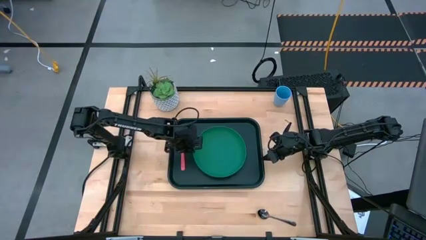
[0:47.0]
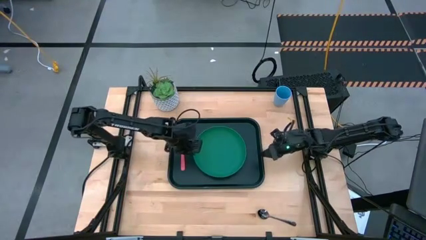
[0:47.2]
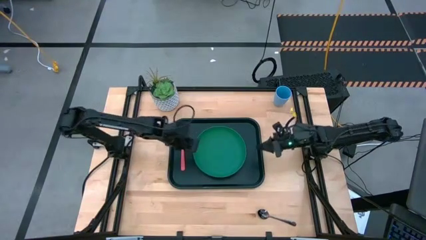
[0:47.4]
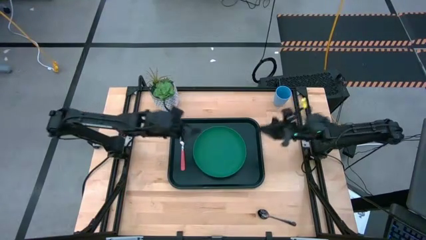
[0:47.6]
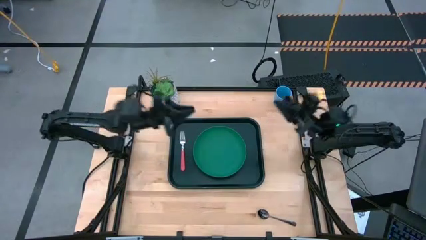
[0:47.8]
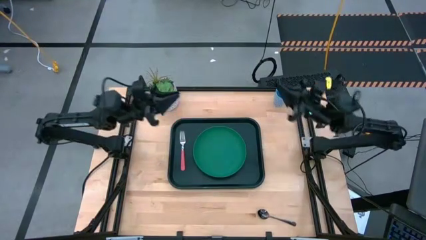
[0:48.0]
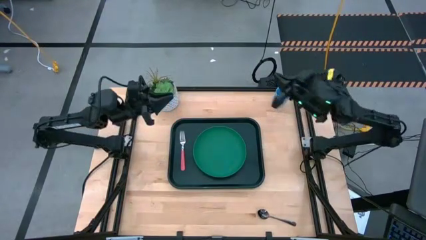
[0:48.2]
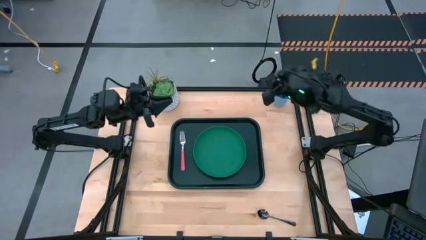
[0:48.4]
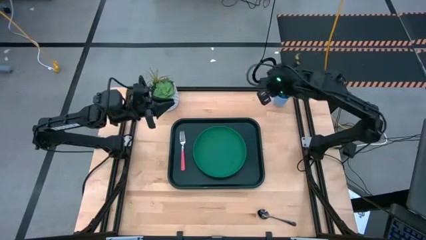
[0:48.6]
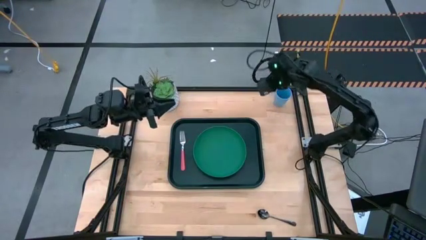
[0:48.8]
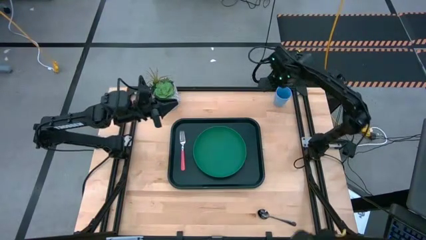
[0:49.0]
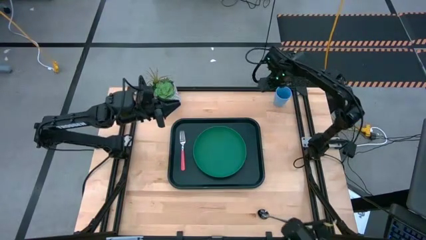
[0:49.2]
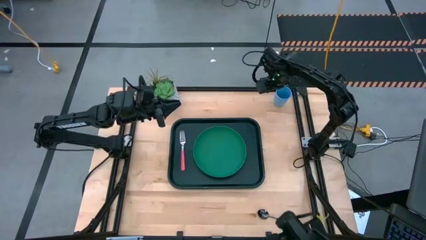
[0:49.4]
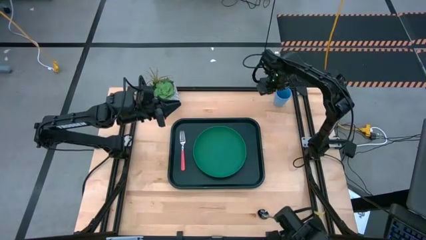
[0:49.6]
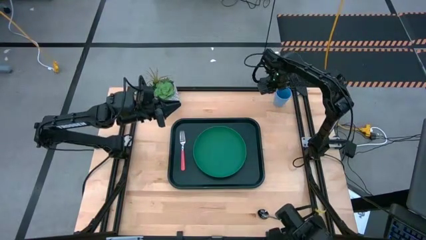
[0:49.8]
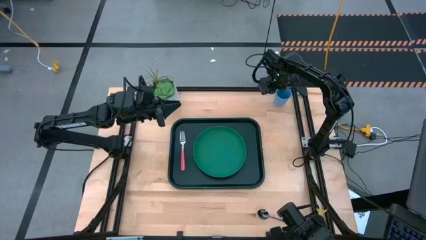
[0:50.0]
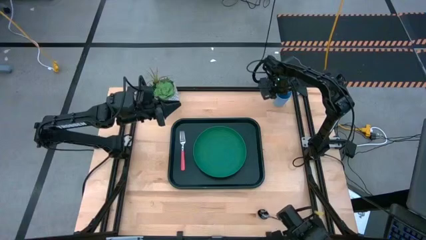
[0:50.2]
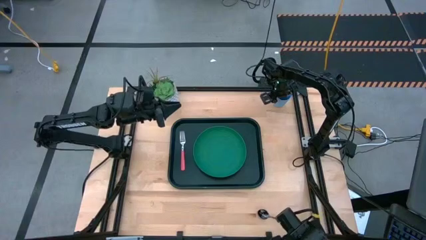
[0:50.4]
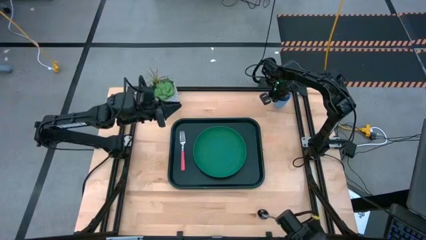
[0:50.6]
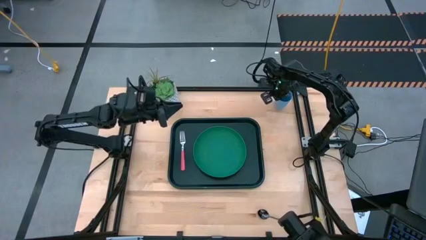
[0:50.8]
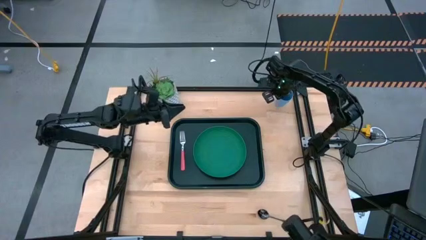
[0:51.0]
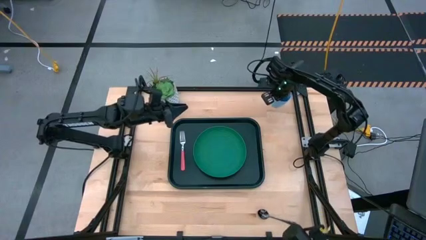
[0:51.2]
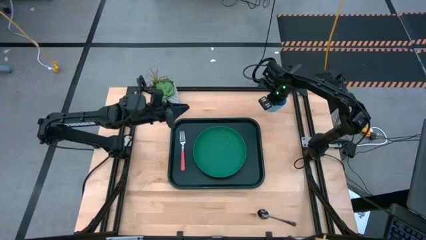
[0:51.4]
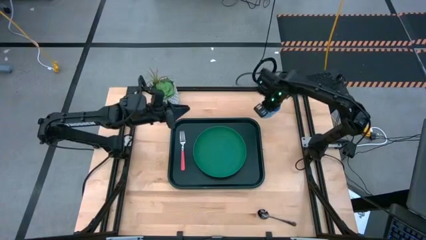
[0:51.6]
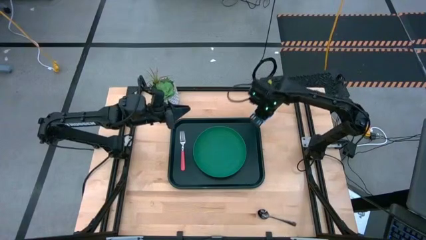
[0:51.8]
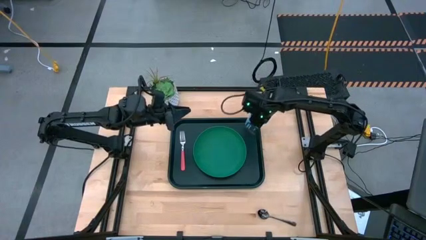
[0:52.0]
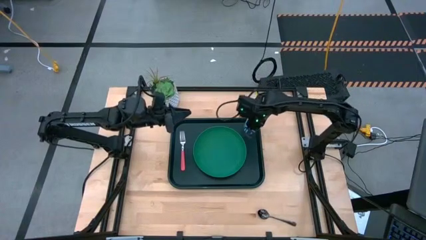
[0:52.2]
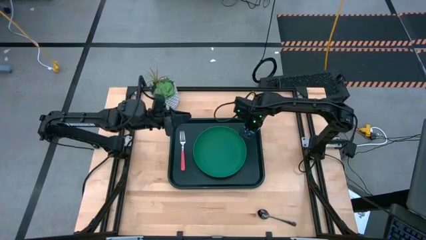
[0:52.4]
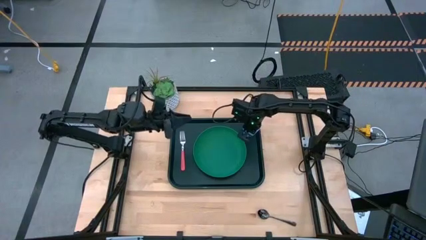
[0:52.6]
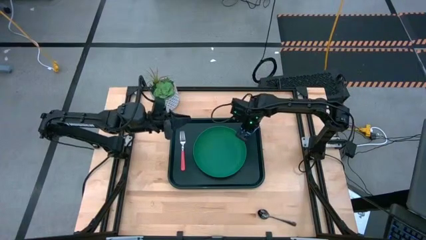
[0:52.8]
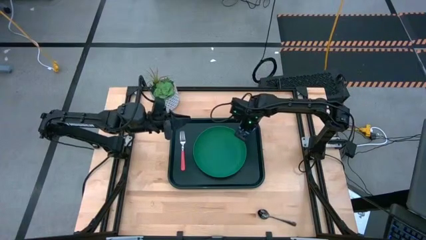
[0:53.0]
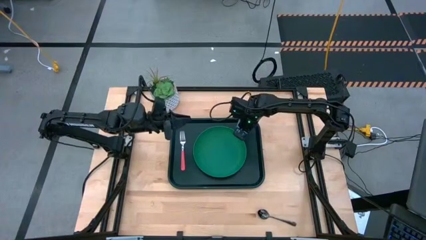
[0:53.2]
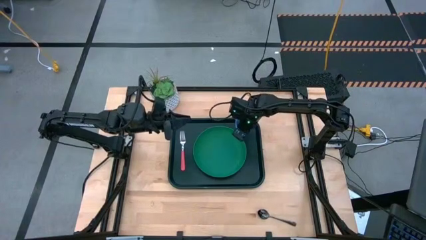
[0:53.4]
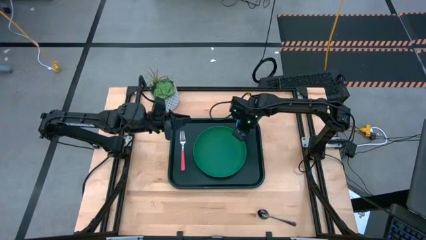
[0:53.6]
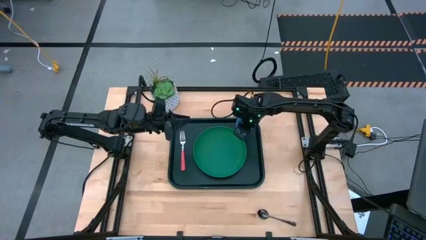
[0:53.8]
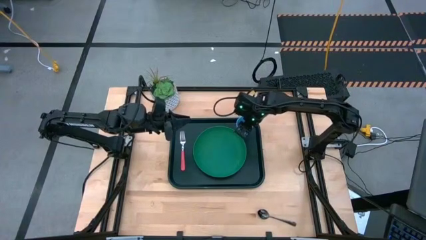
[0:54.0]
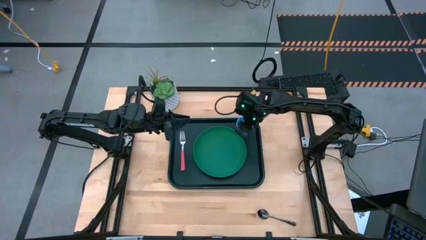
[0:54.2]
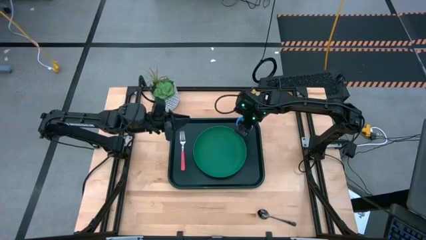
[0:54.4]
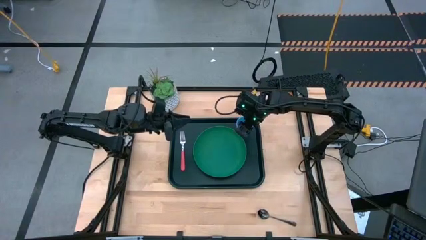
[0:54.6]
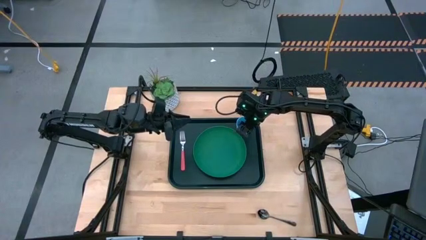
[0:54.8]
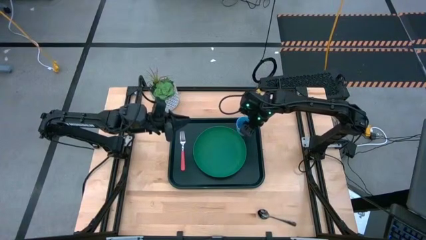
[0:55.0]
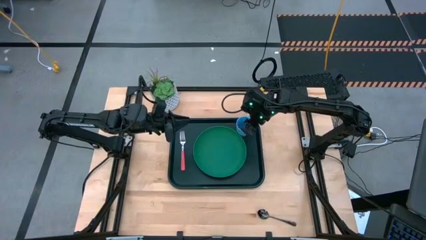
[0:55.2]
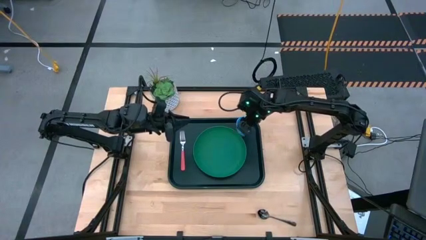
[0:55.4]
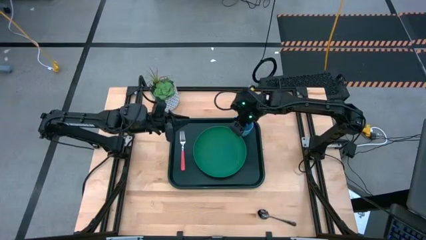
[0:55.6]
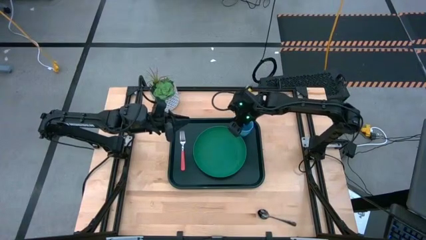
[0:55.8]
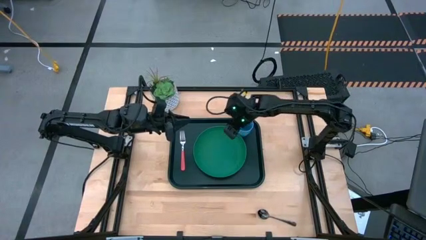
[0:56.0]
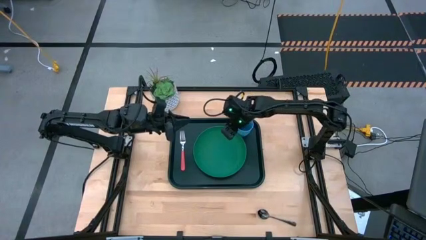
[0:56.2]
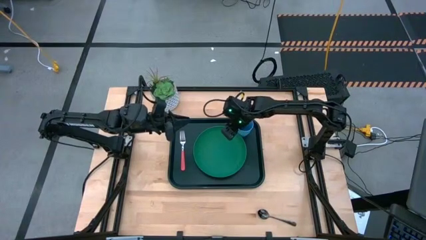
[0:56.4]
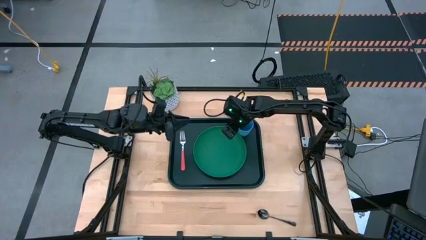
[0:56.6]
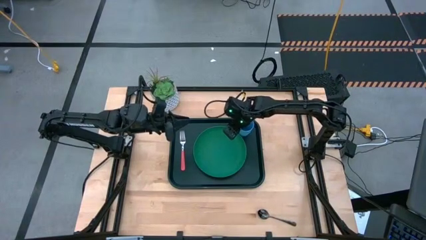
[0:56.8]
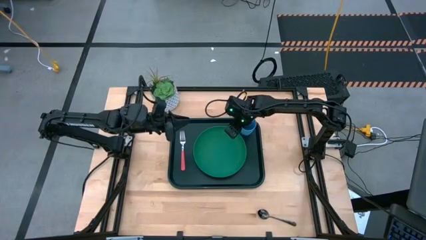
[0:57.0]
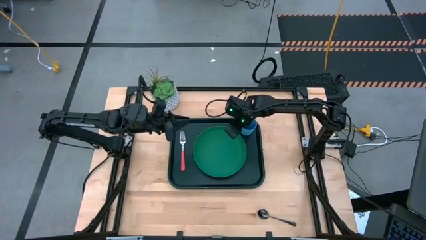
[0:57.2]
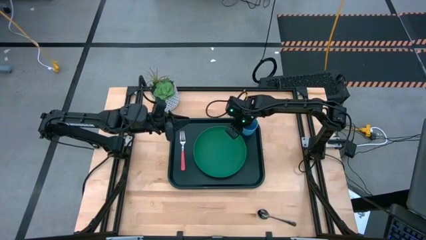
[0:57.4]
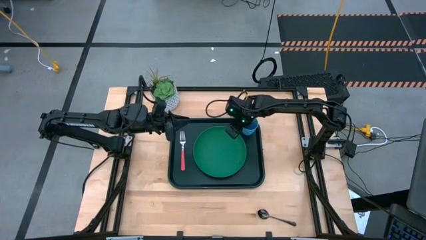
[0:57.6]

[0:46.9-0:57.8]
Task: Pick and place plate/cup/fork/spoon on tray
Put the blue cup on the dark green serving tray to the top right of the green plate
